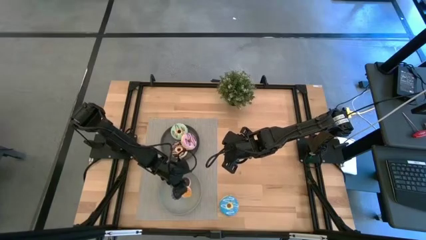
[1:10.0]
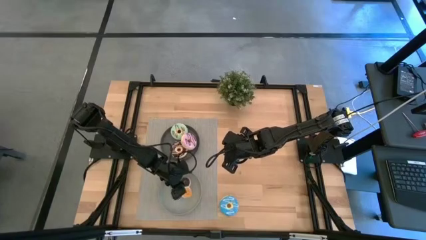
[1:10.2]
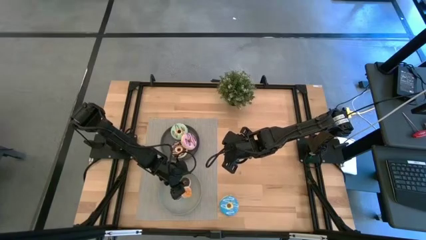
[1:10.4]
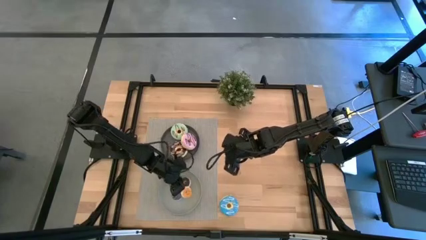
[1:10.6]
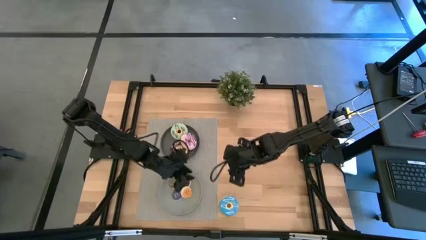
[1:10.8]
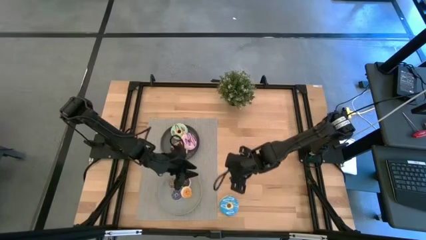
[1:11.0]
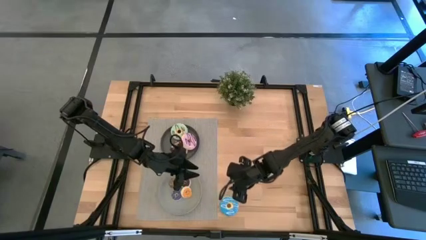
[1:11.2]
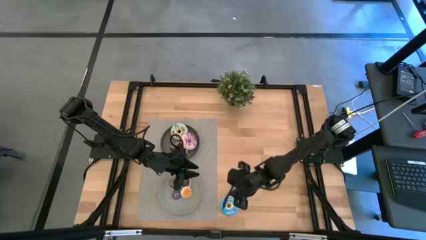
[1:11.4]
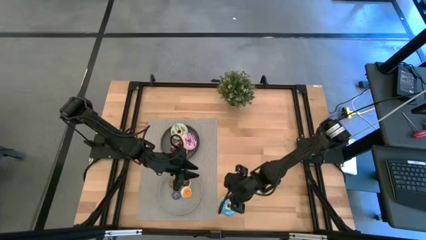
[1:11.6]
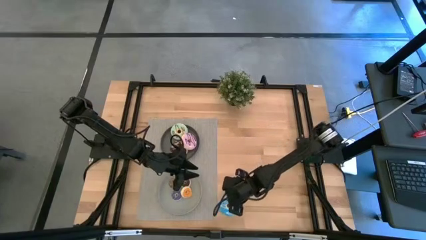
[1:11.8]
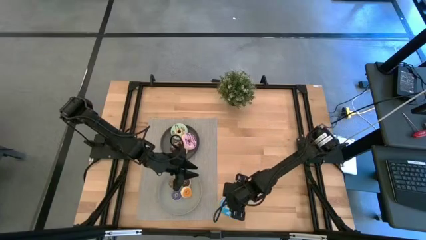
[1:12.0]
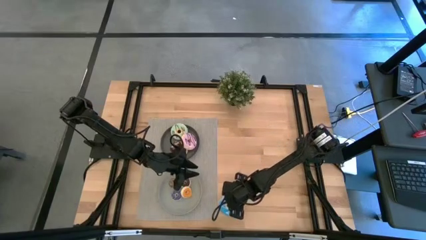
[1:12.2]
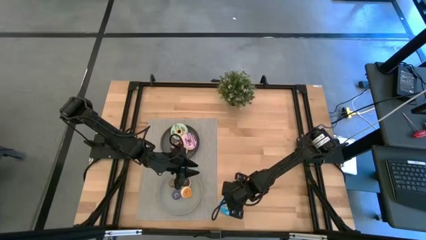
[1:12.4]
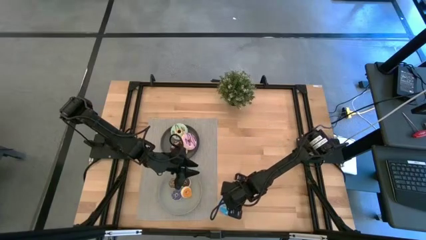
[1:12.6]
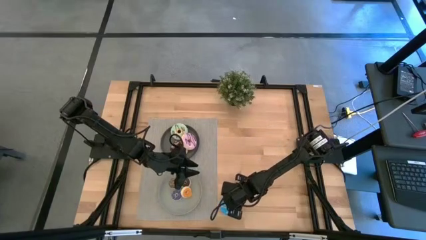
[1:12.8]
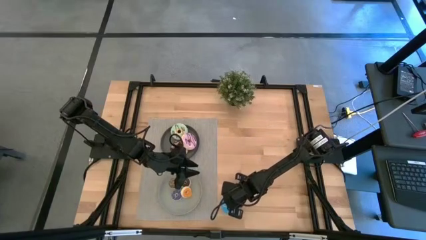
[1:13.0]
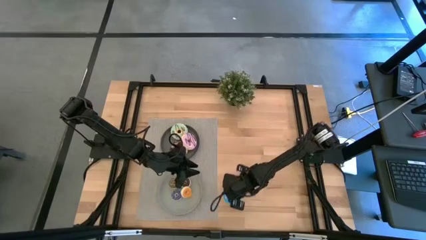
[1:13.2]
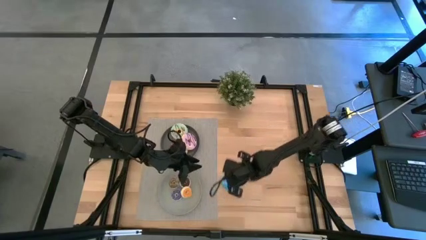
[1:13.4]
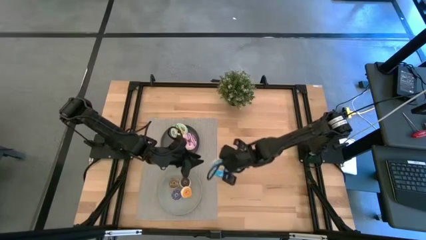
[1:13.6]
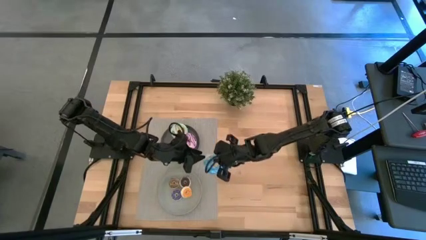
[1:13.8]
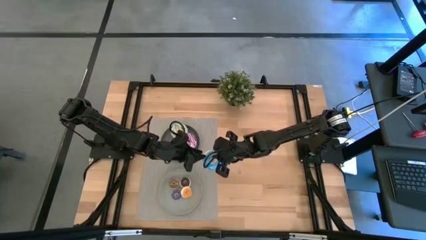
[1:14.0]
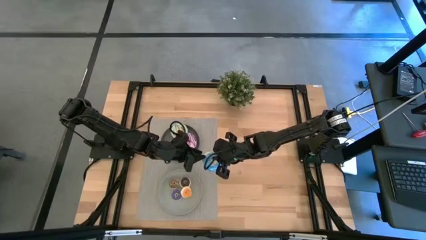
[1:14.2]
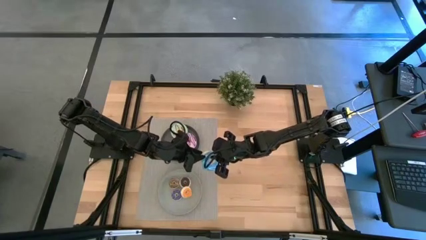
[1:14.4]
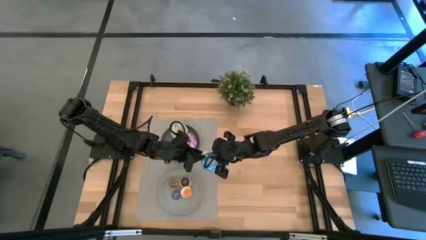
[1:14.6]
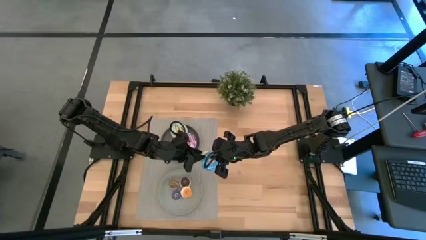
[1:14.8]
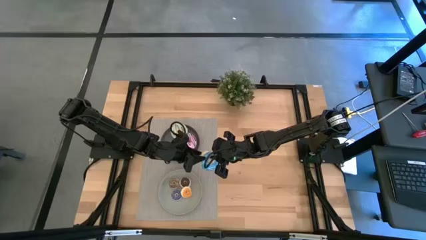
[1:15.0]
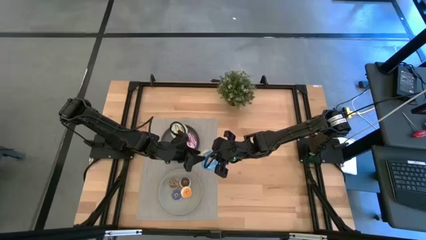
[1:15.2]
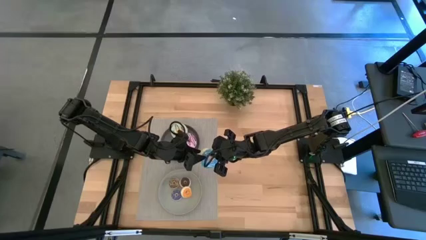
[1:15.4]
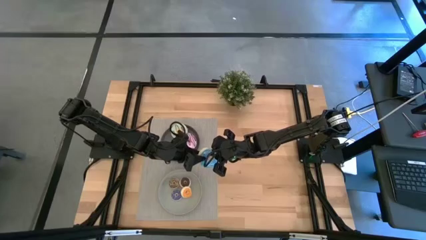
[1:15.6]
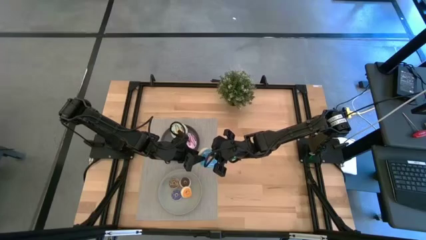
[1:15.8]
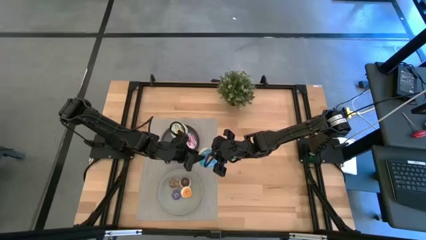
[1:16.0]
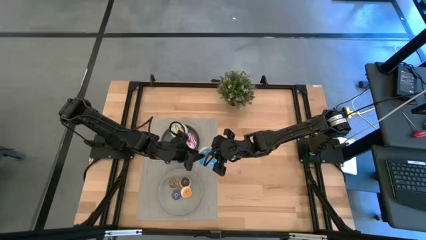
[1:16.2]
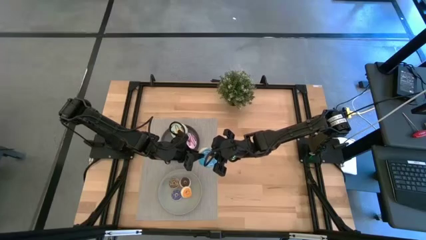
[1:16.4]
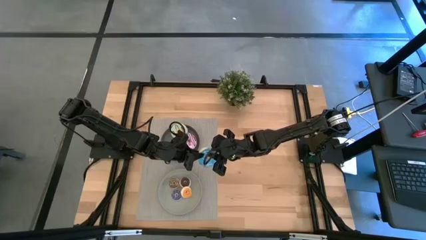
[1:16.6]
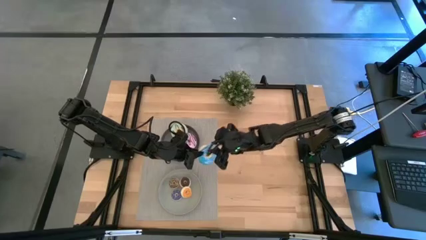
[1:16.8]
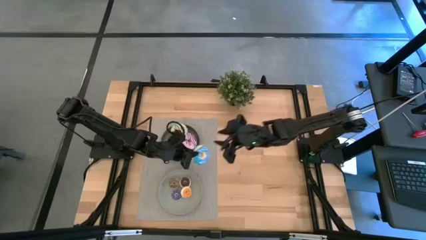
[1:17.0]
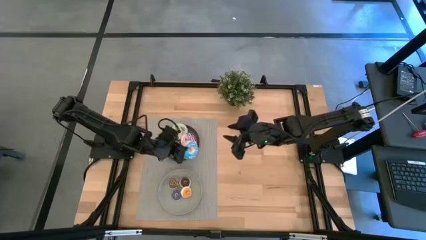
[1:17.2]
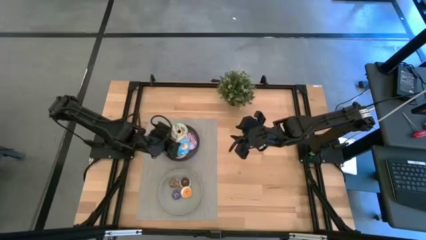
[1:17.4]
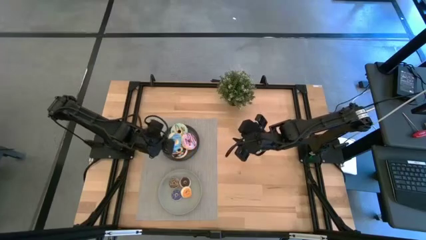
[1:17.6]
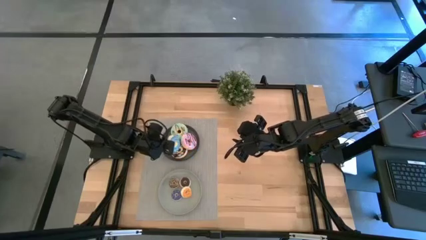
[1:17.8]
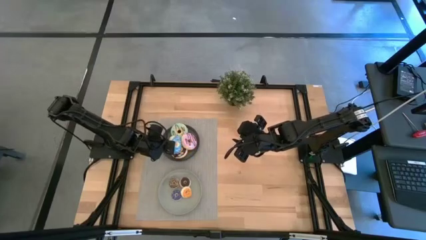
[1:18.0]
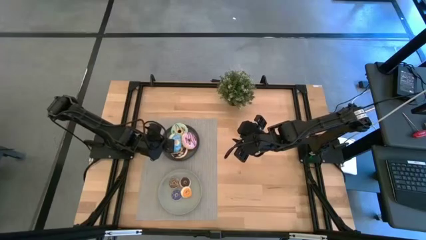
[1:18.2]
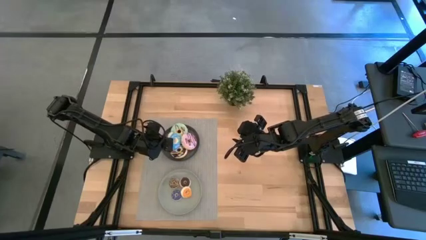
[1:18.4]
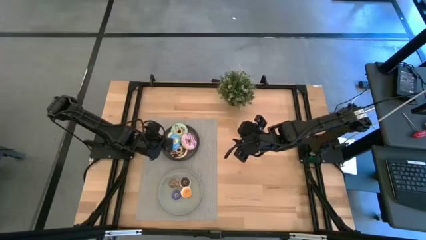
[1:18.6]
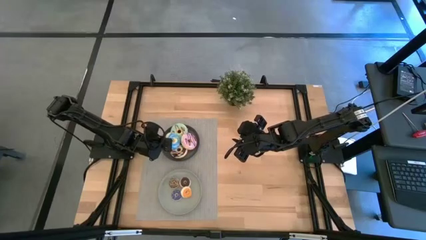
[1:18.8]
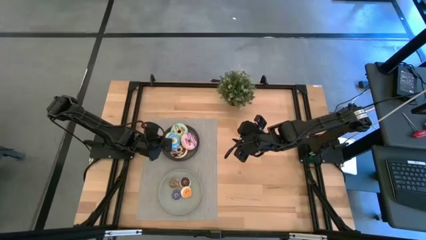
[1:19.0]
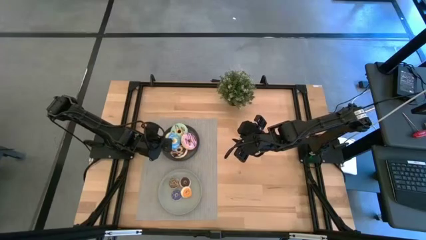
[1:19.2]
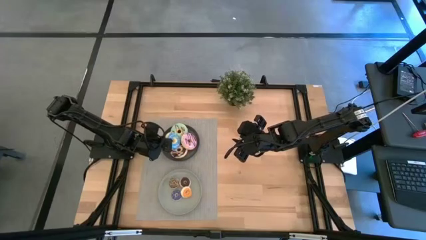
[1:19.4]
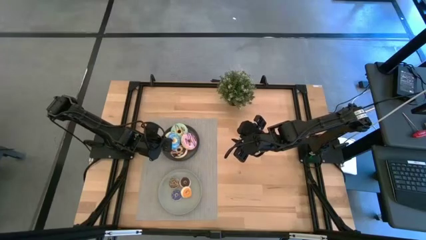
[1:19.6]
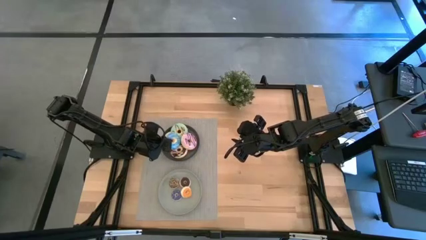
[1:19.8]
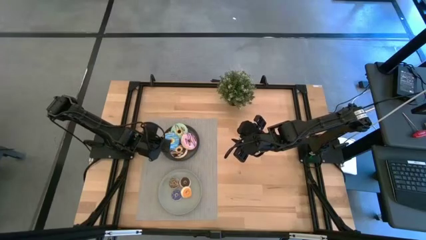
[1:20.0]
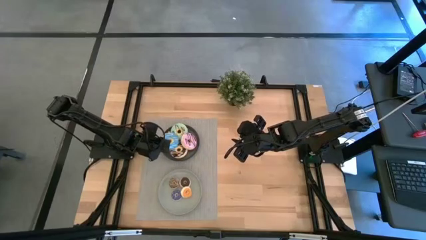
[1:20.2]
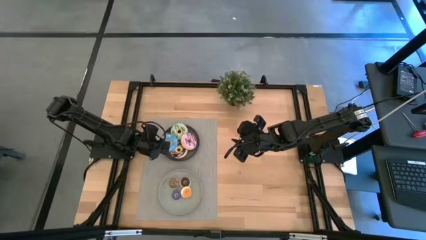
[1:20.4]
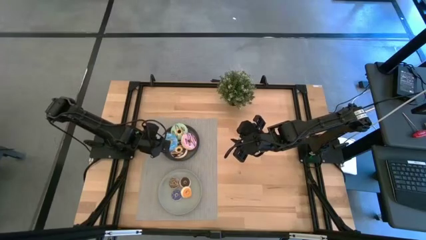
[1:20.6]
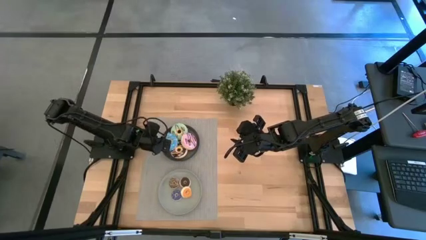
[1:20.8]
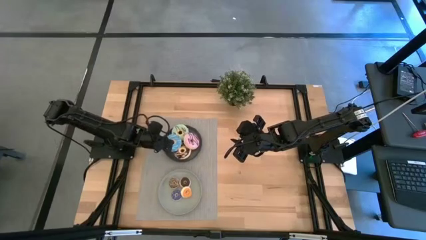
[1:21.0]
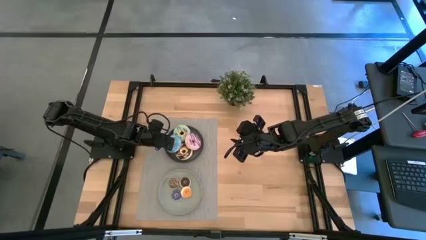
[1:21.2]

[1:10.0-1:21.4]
Task: Pick & Place donuts
Put the big blue donut on the black plate

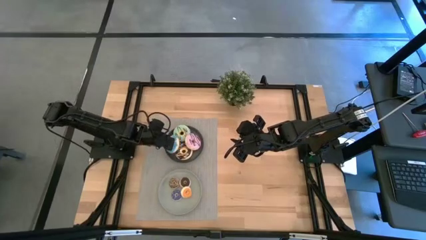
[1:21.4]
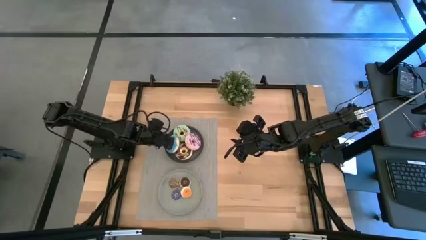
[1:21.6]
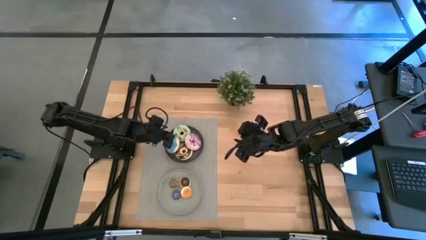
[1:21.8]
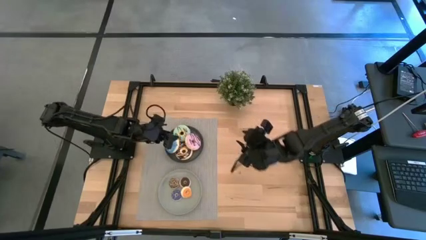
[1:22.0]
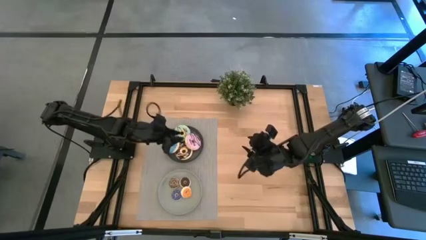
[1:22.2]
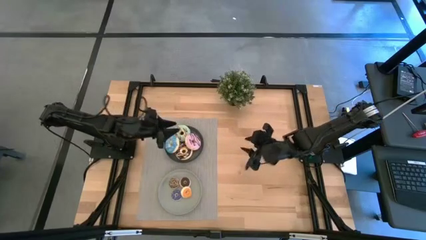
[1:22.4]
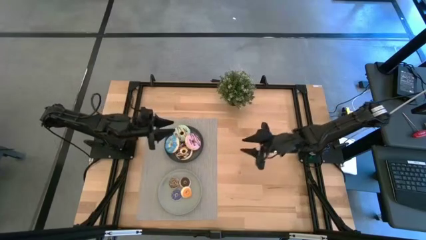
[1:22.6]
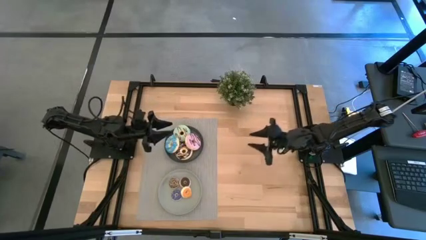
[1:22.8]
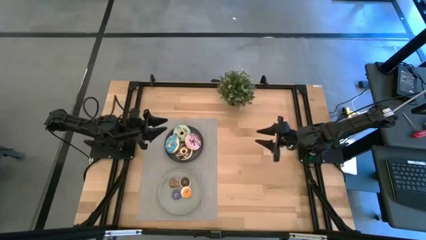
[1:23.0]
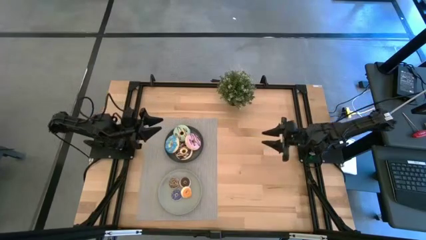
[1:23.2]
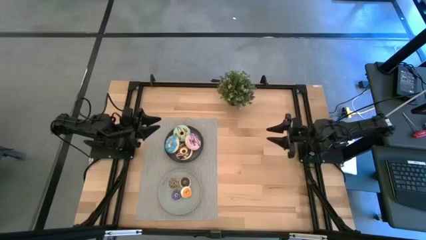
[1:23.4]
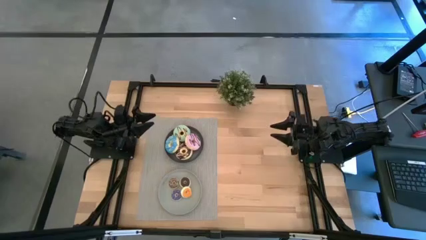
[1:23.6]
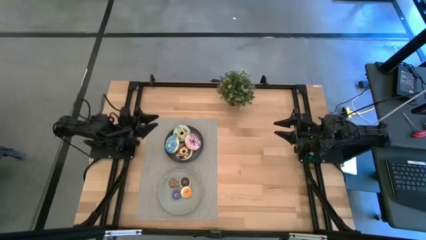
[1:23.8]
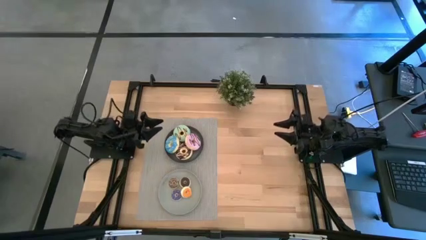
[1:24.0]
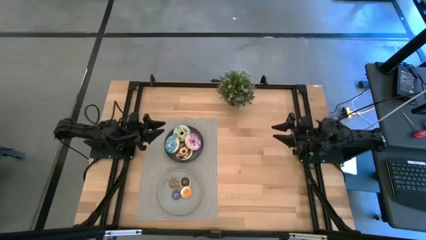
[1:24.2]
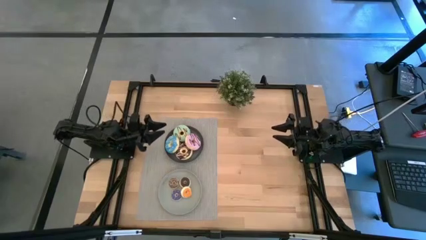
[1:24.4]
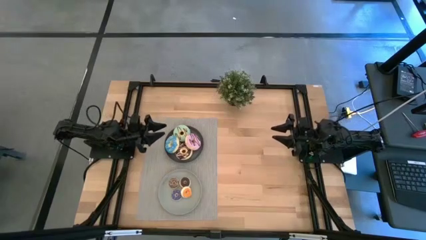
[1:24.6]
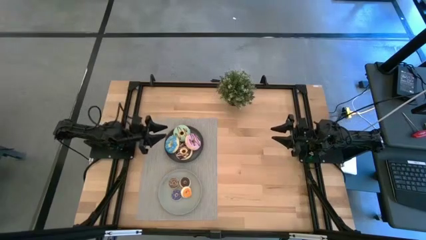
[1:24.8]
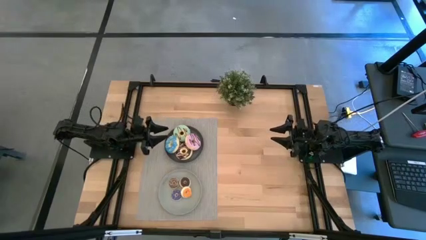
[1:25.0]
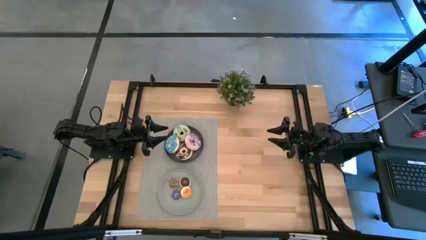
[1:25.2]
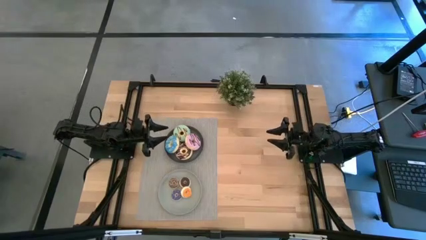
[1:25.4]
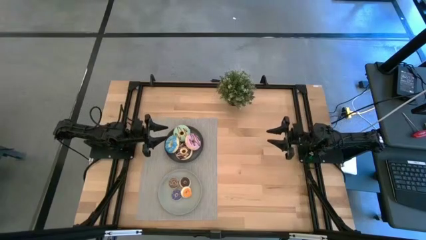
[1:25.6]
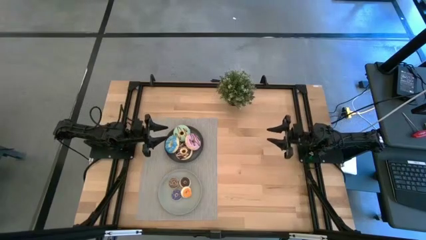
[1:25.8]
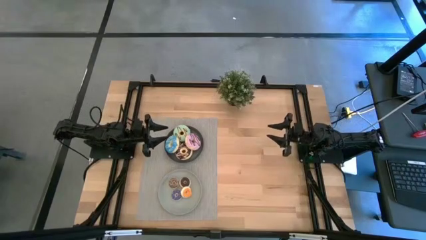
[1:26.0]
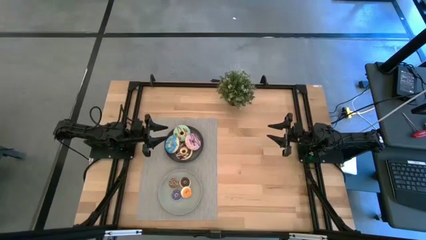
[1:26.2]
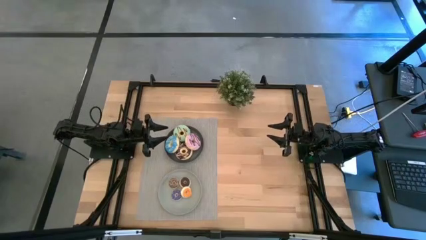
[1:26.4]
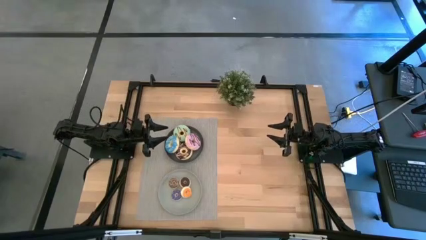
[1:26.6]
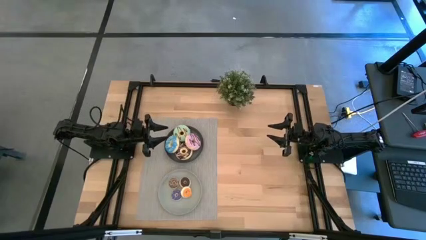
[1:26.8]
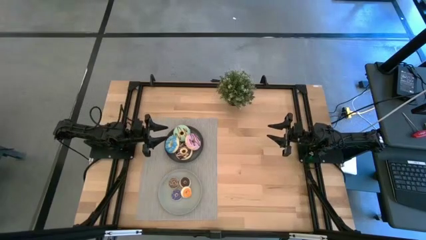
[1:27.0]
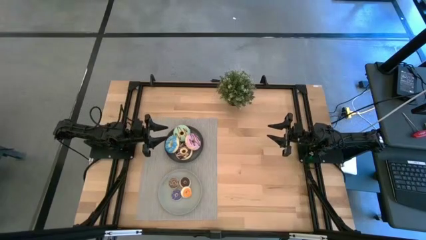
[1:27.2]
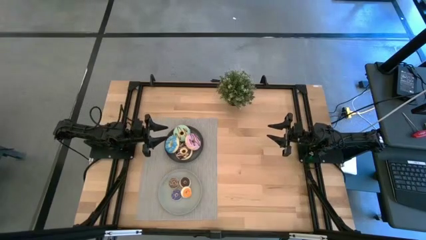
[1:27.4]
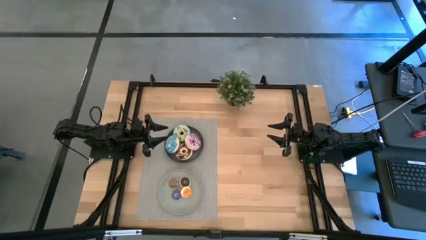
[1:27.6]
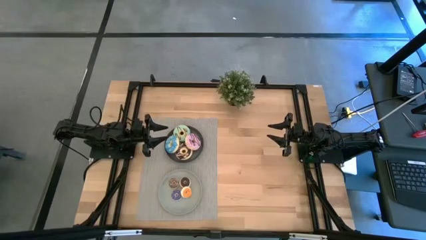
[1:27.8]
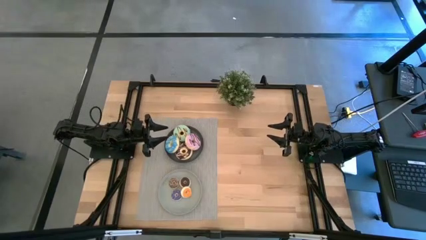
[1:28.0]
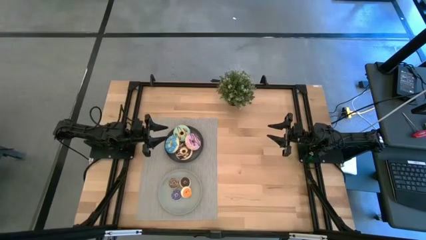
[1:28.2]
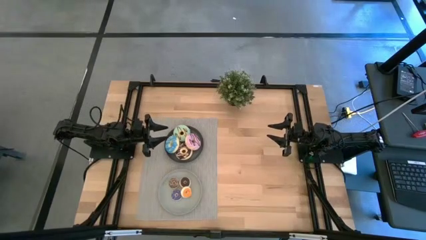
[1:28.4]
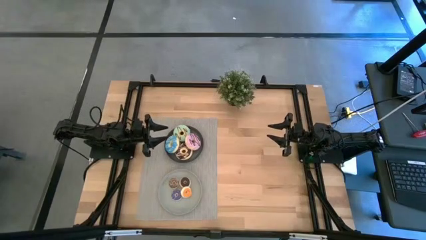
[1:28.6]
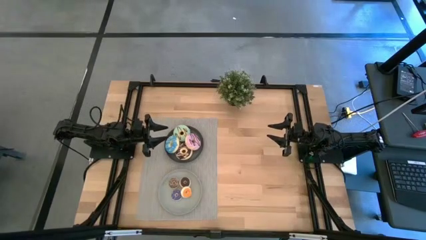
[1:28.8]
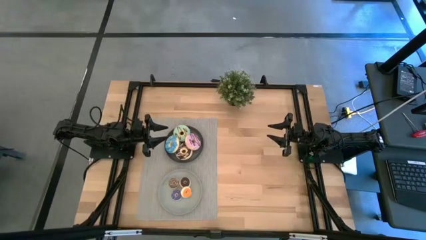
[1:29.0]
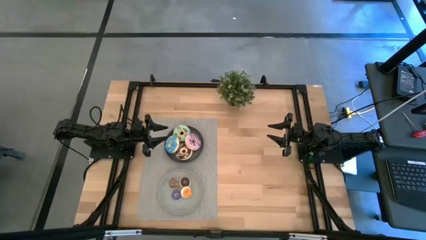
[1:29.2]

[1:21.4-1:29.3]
Return to Home Position
